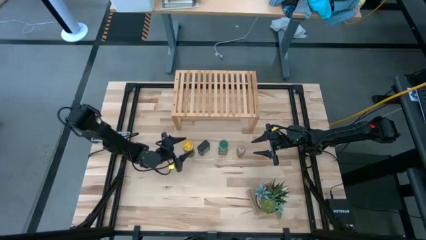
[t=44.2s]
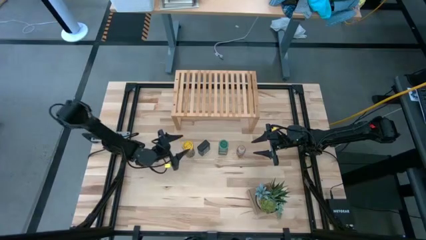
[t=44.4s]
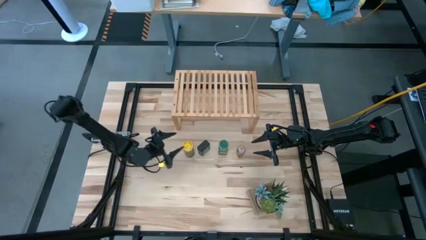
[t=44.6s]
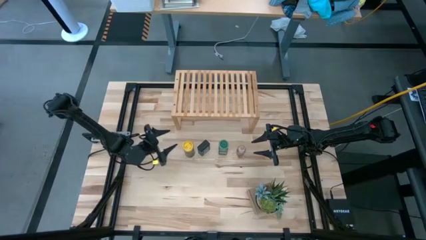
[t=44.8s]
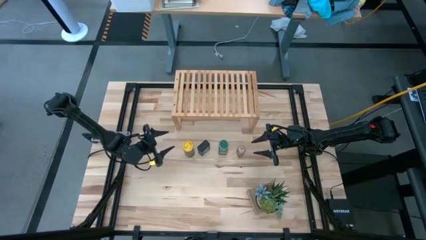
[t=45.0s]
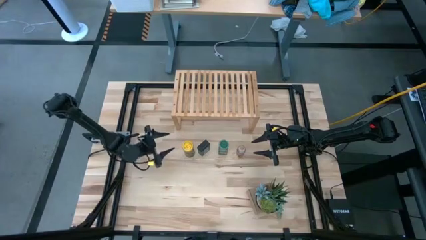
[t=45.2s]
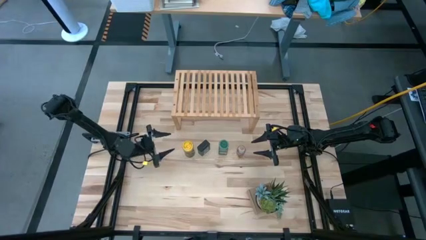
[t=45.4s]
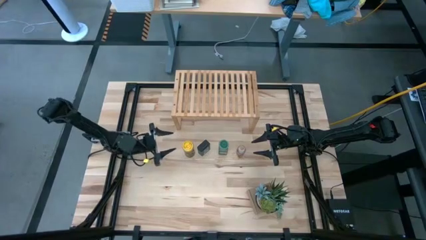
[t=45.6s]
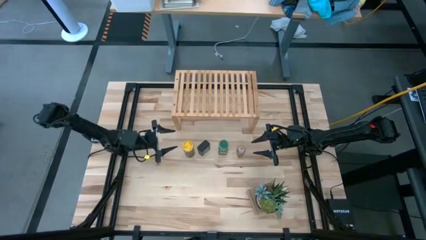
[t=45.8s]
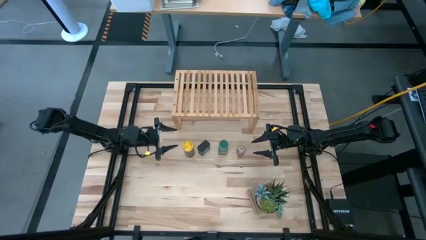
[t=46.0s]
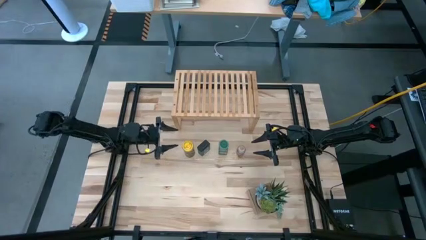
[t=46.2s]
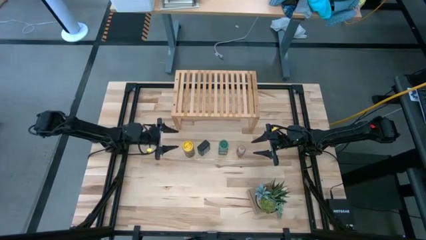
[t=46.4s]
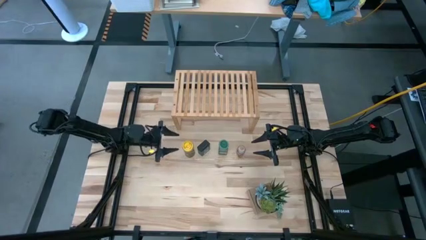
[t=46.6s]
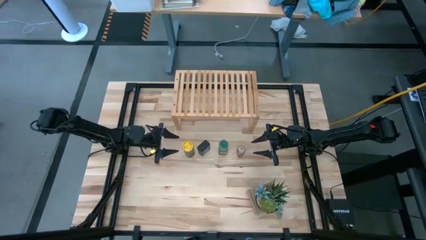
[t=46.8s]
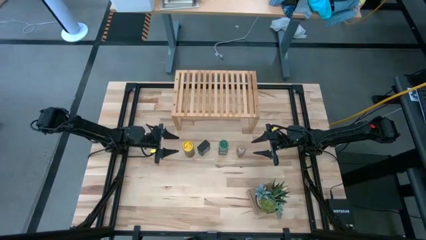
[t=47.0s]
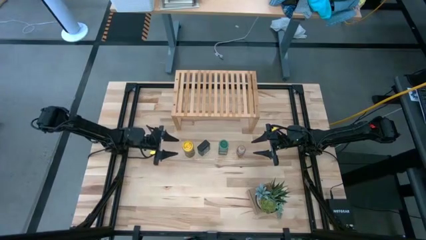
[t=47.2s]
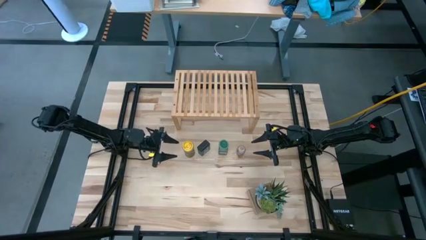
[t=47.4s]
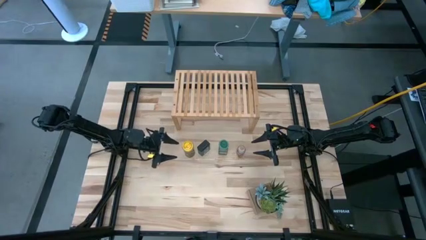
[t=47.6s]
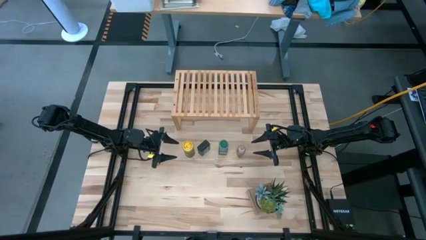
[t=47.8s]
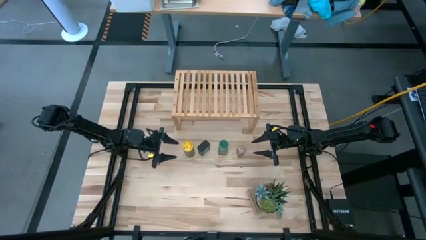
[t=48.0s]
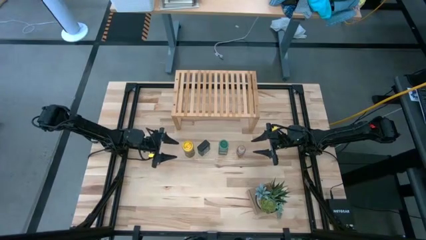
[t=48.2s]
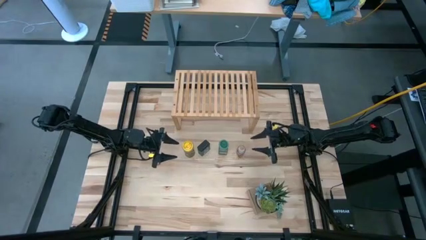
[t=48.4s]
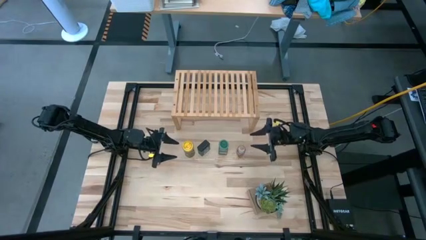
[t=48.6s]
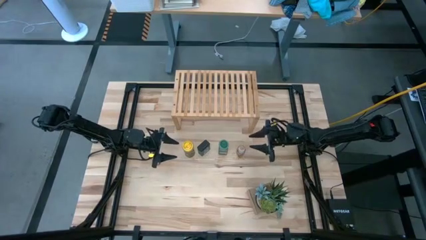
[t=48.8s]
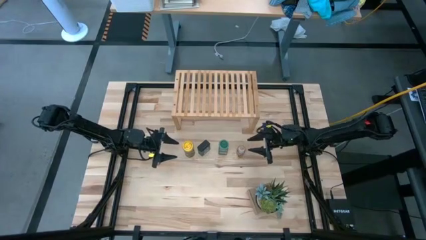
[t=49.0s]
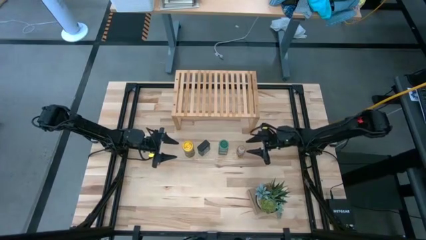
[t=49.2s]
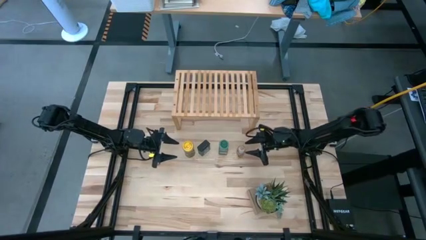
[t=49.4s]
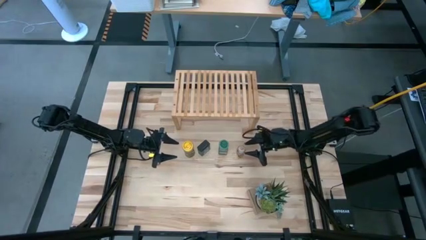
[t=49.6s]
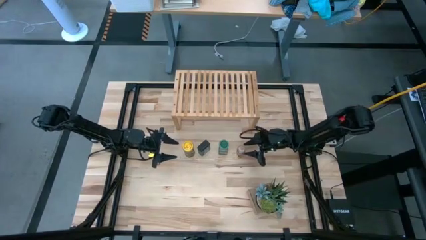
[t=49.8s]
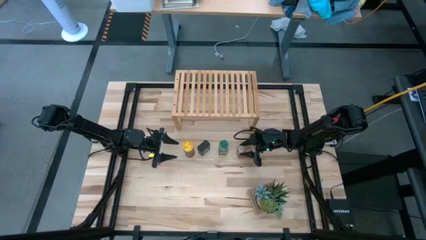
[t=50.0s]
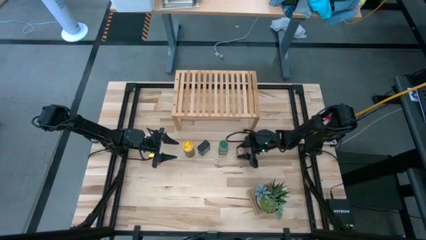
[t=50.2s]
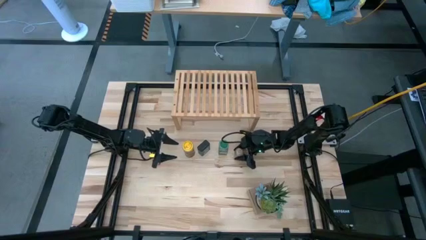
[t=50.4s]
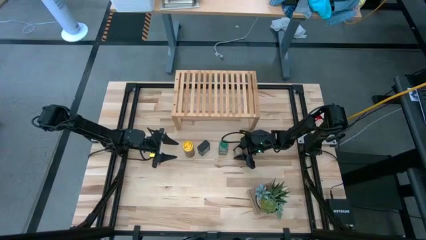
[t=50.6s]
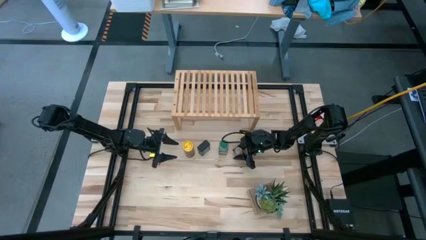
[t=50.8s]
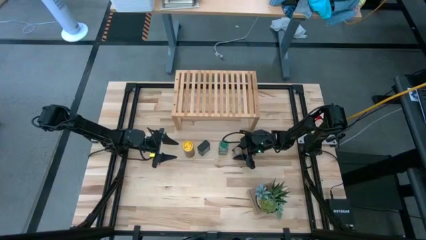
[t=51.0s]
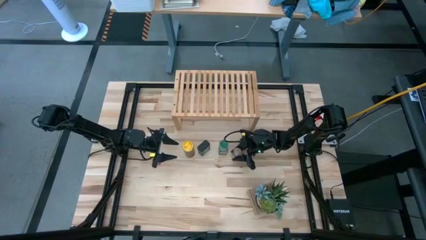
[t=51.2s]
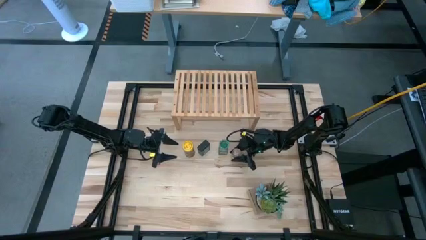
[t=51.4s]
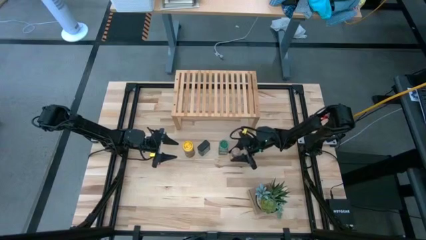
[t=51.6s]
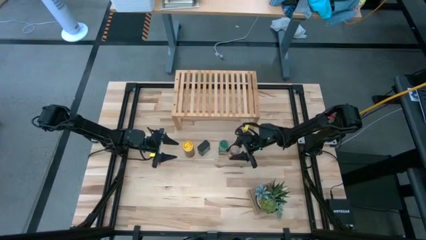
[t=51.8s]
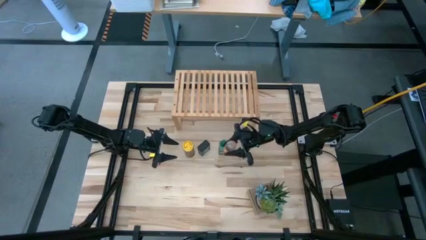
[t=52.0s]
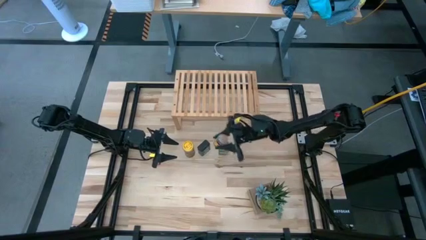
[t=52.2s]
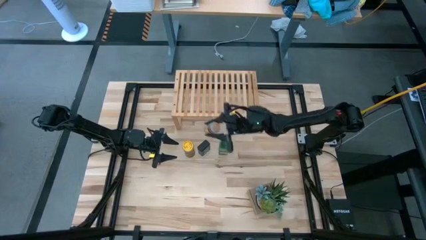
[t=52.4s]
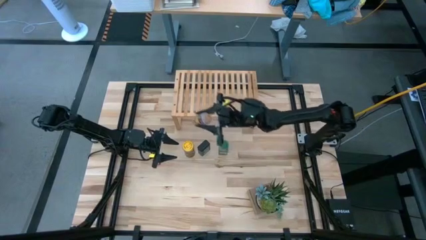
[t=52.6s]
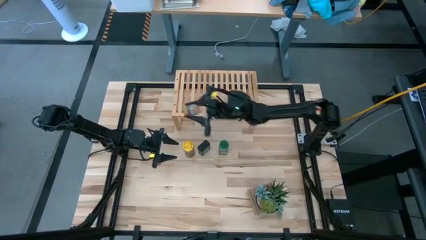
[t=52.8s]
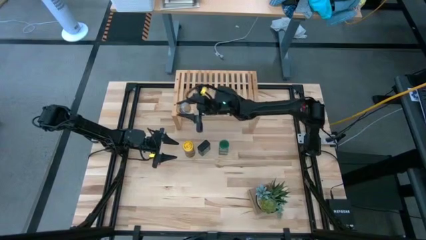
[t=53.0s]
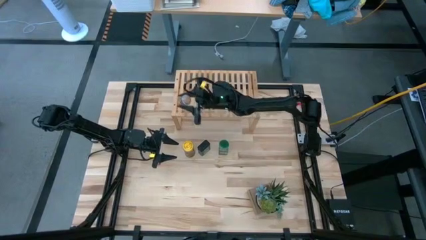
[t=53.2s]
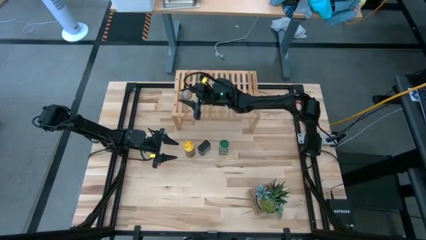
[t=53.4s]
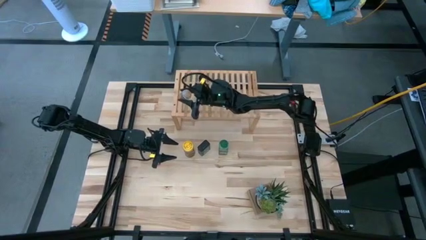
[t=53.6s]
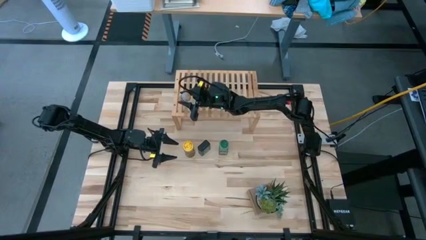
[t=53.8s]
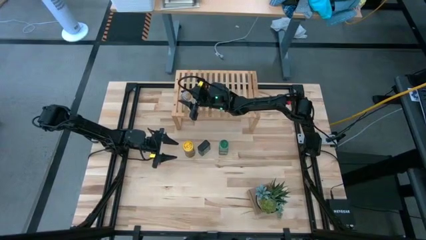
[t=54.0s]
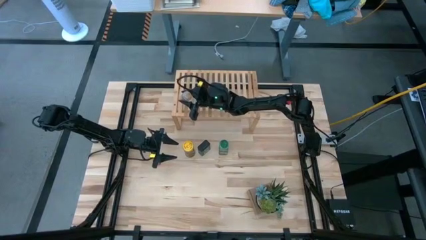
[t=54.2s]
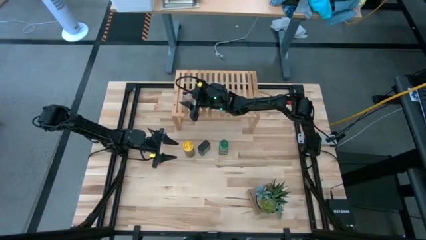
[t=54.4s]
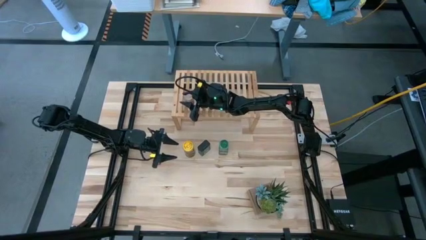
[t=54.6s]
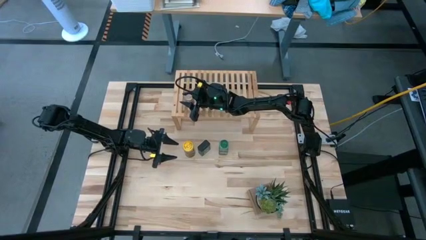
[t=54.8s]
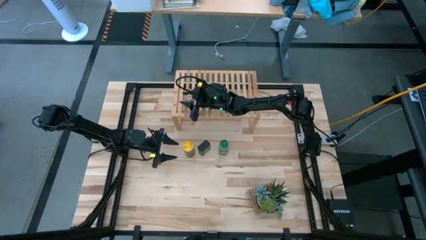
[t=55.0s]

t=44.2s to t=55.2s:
Task: Shelf spices
Put the small brown seasoning bottle on the shelf

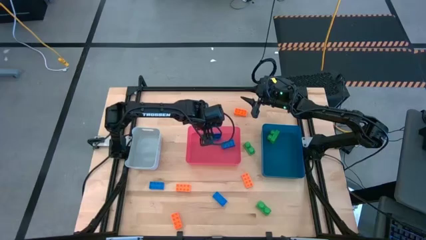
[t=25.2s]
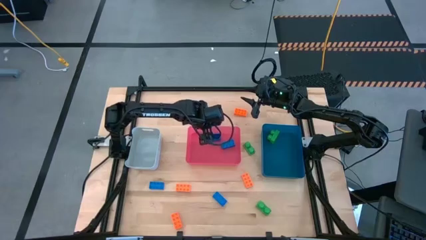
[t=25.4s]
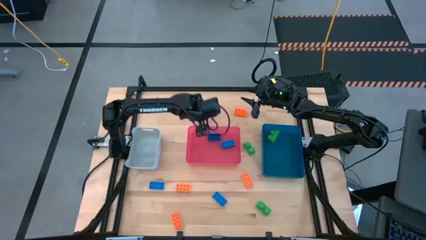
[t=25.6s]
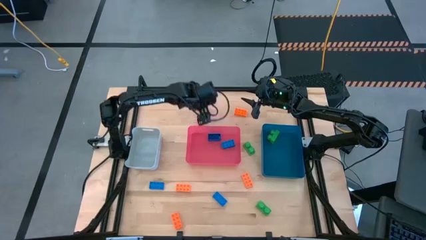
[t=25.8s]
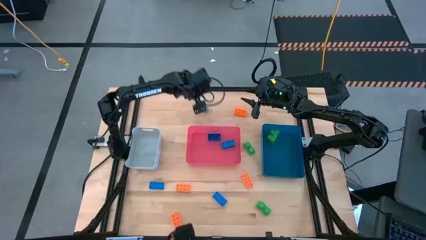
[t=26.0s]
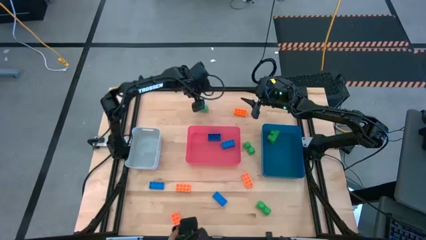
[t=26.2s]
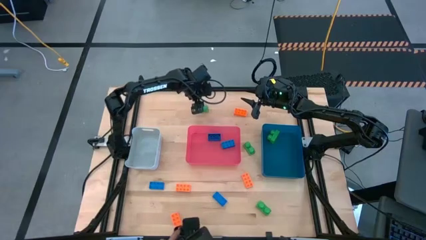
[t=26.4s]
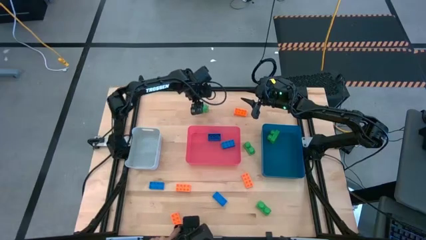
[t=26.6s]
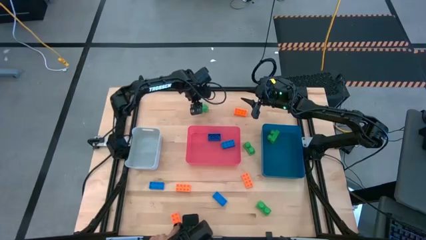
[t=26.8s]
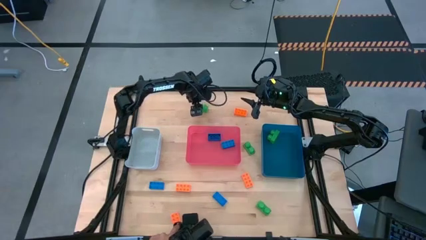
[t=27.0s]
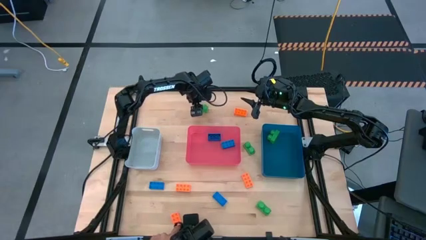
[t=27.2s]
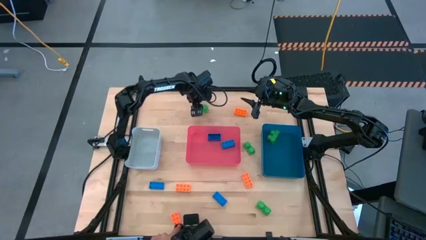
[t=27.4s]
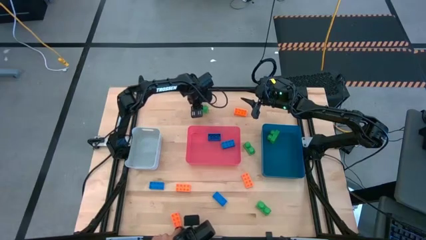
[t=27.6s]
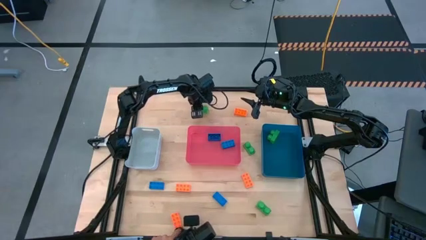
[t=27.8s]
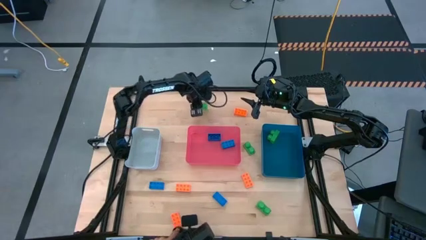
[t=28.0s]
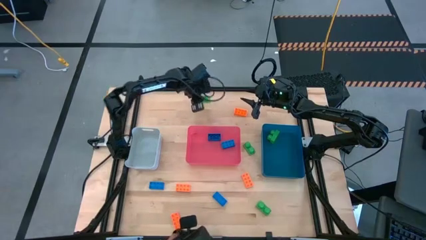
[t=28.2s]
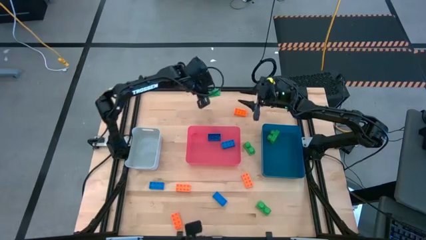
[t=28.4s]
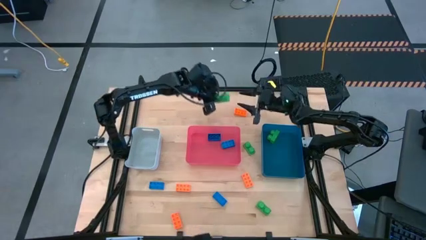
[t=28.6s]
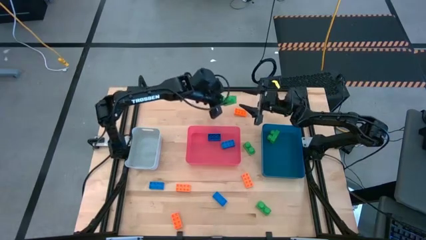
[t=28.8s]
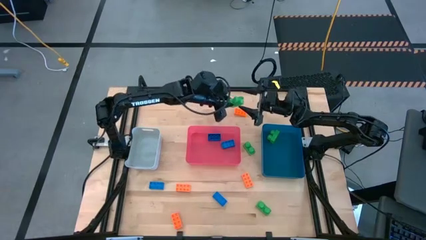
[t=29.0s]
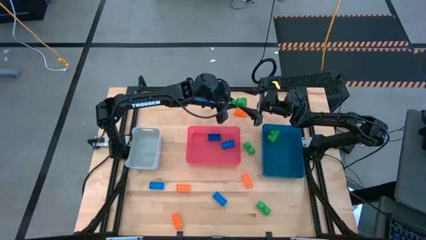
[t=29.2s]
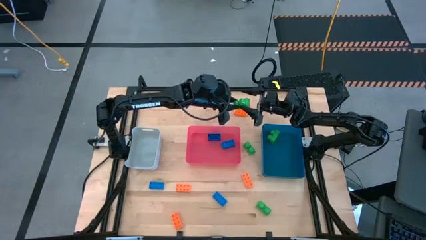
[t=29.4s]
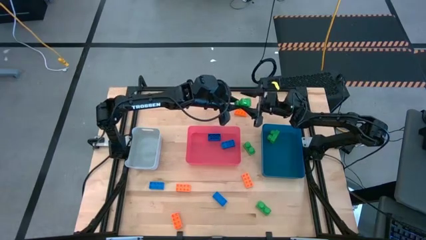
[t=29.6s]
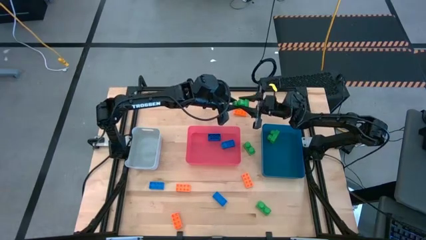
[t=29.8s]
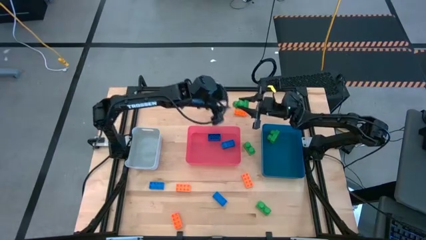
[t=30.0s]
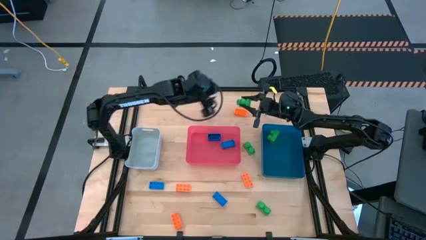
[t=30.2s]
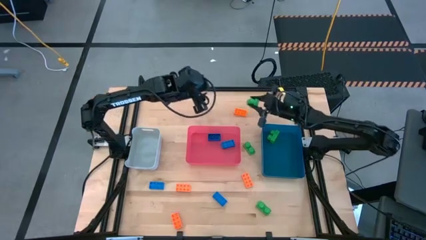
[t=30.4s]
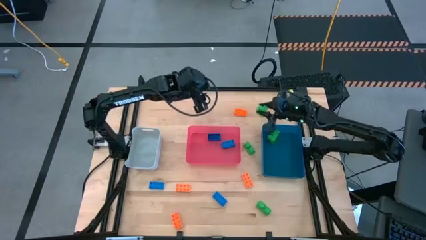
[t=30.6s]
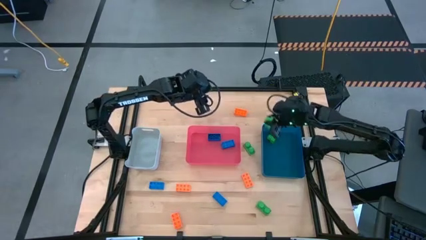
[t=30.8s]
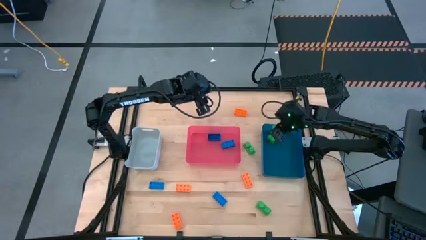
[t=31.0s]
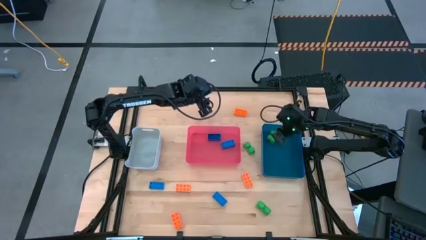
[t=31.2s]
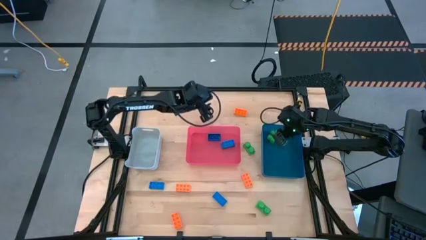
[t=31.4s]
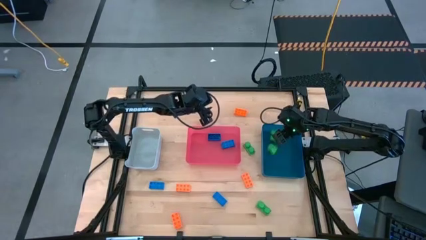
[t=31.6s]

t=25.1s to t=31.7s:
Task: Sort & place blocks by color
Put the green game piece into the blue bin
